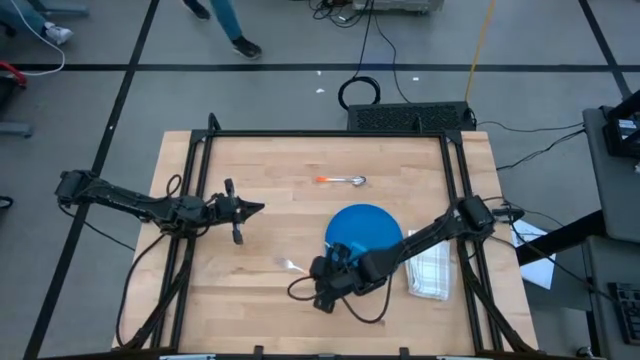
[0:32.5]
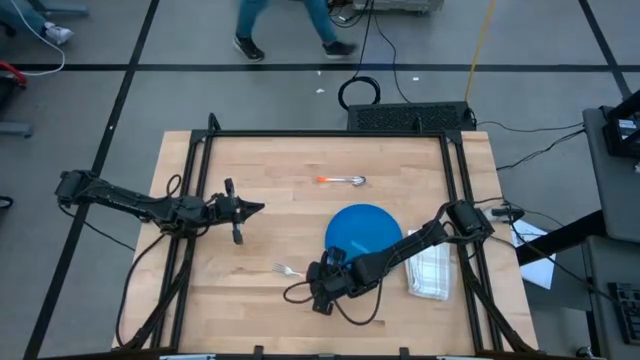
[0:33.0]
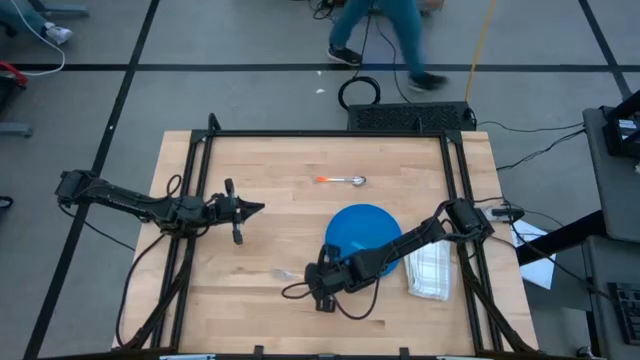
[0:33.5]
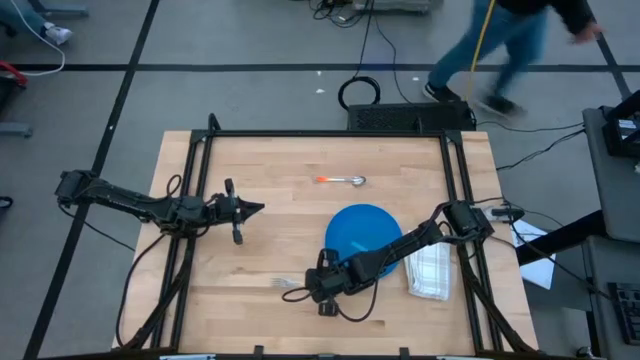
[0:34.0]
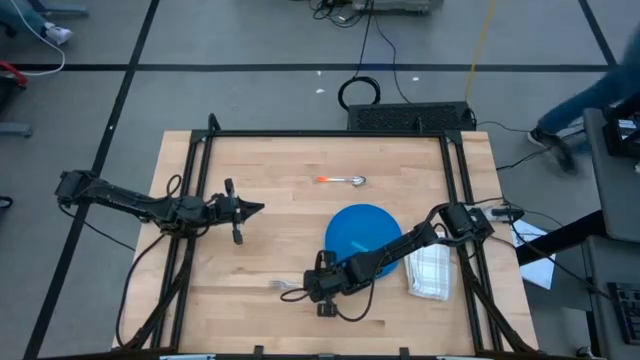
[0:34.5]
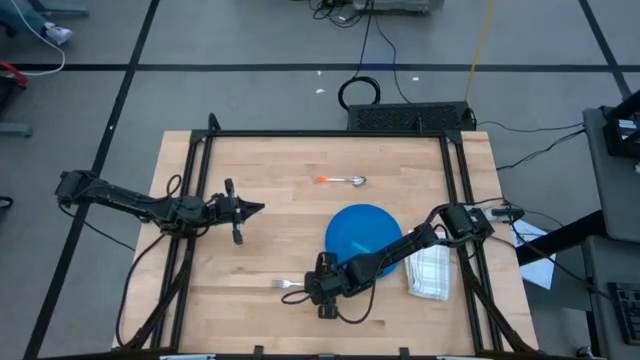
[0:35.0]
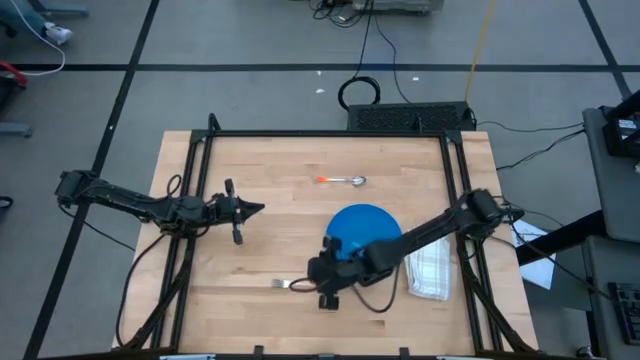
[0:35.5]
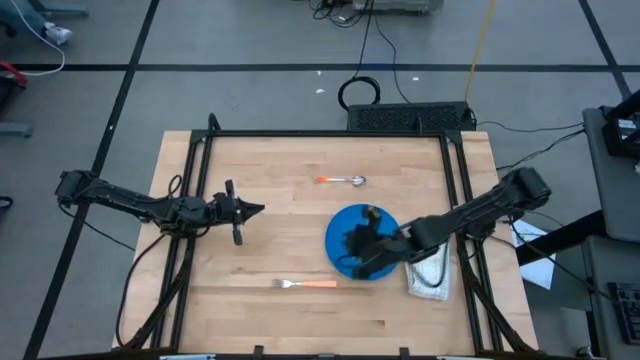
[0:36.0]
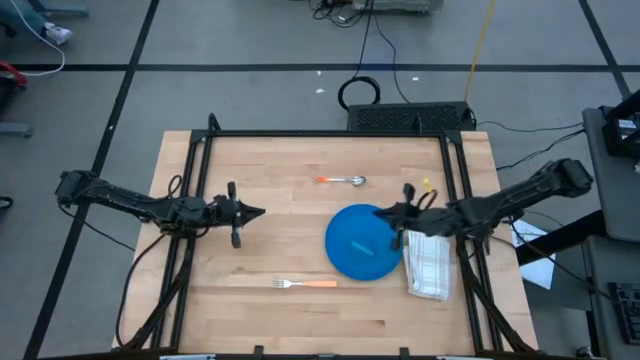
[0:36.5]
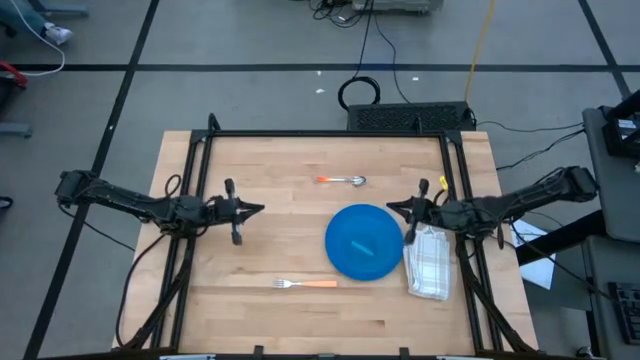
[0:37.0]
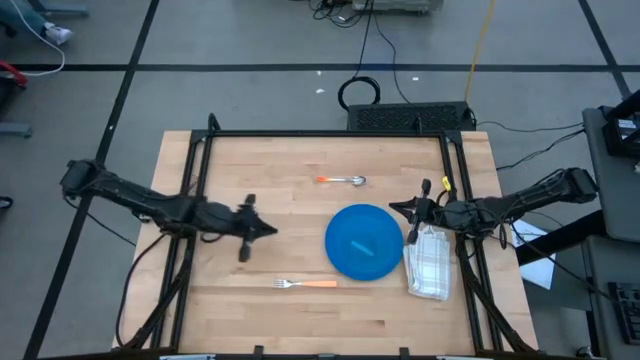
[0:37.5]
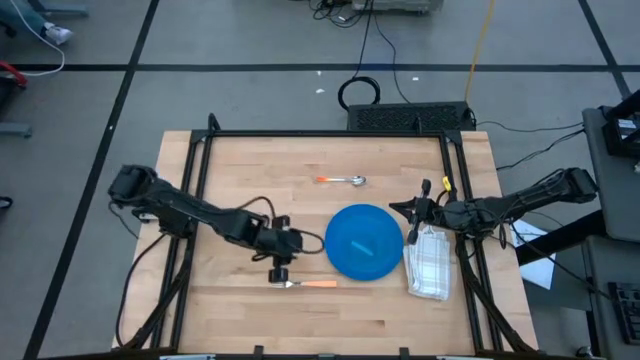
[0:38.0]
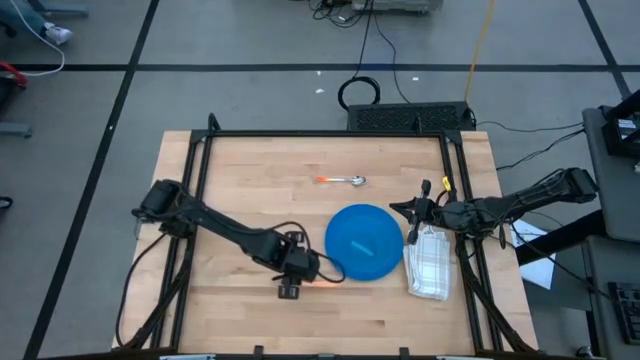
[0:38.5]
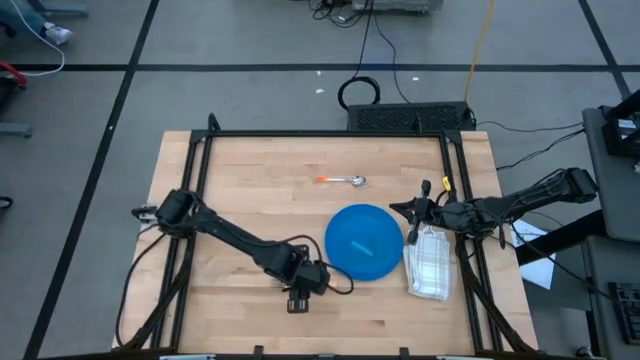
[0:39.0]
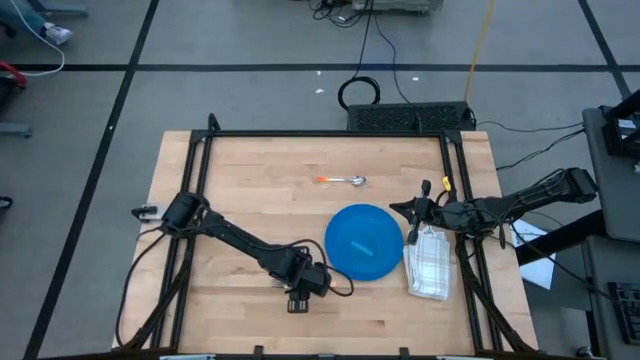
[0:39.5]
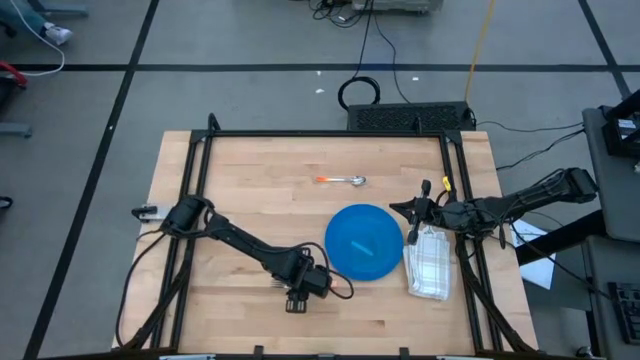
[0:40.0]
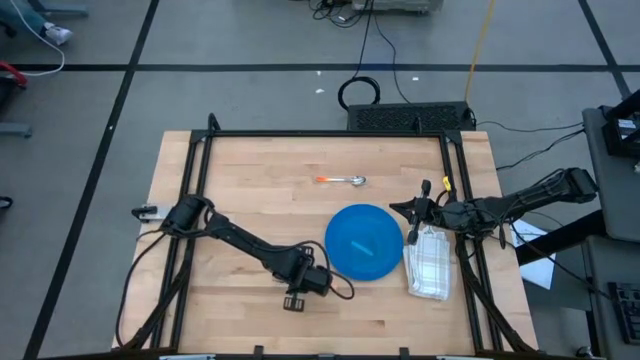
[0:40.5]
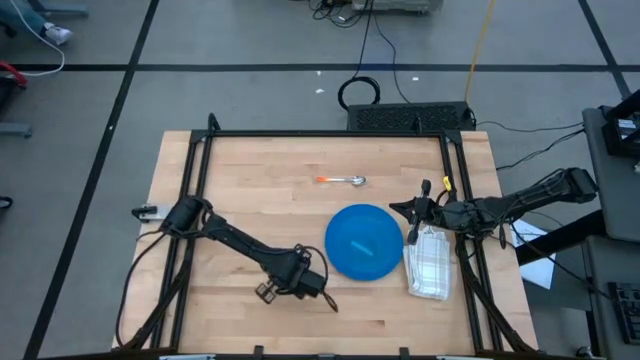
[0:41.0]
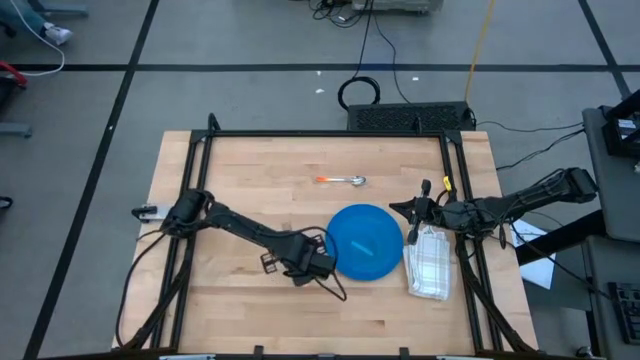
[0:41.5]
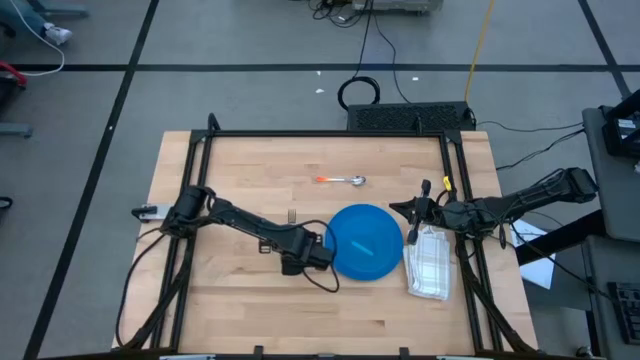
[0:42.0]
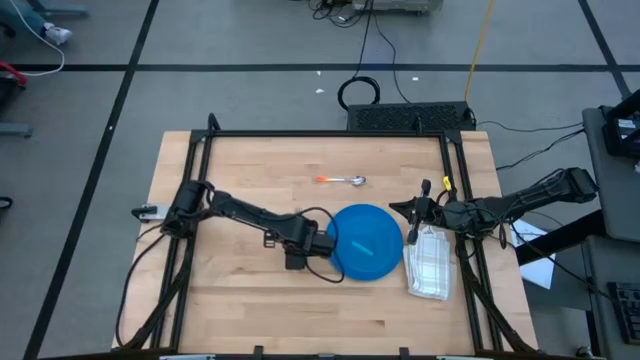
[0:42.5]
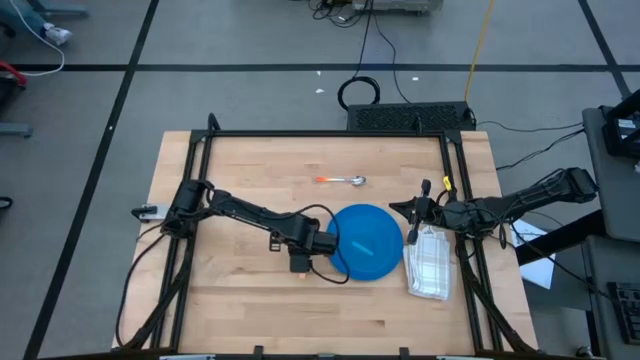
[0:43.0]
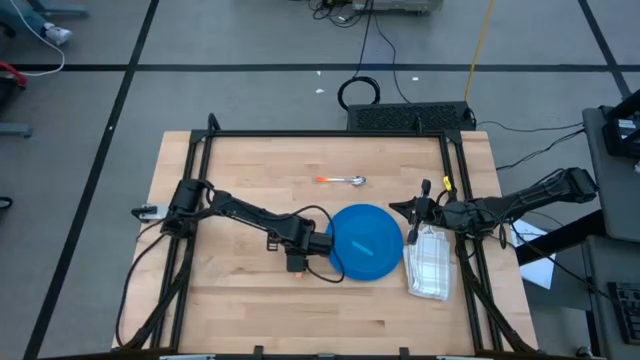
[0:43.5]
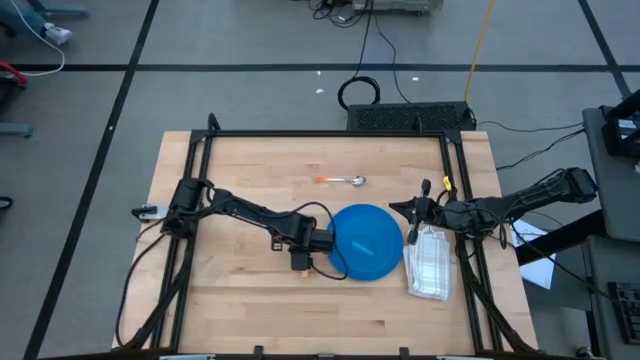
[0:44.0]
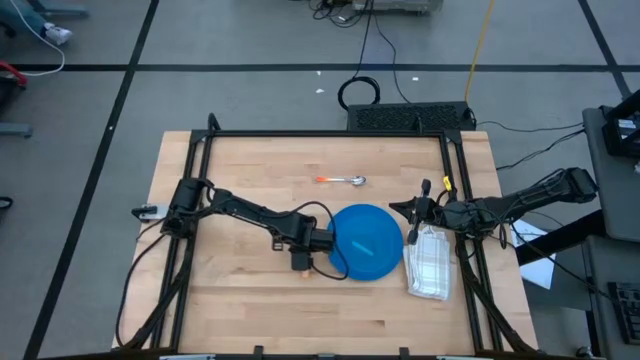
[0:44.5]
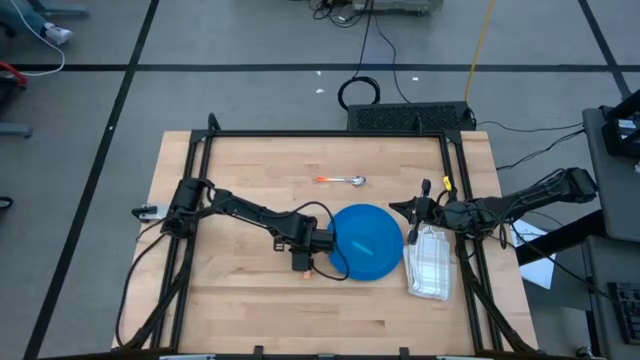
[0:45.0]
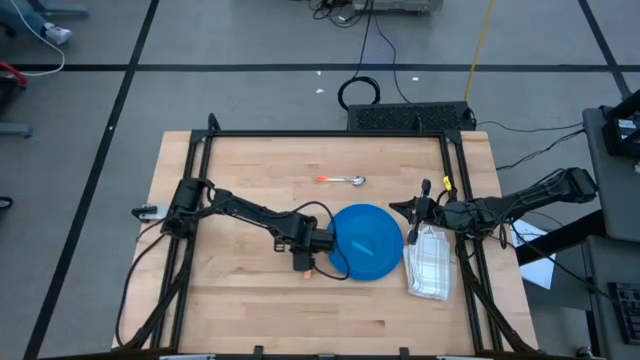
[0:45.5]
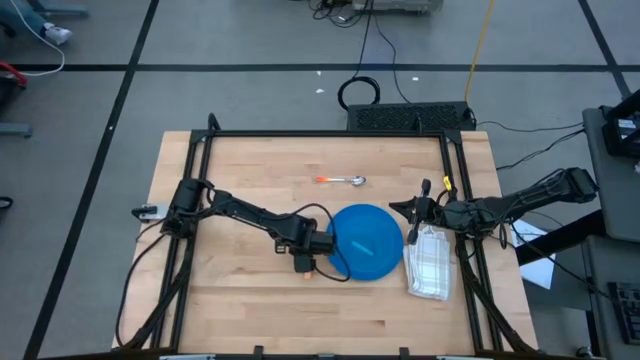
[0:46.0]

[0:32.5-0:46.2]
Task: Set table place
Put the light orange fork to the left of the blue plate

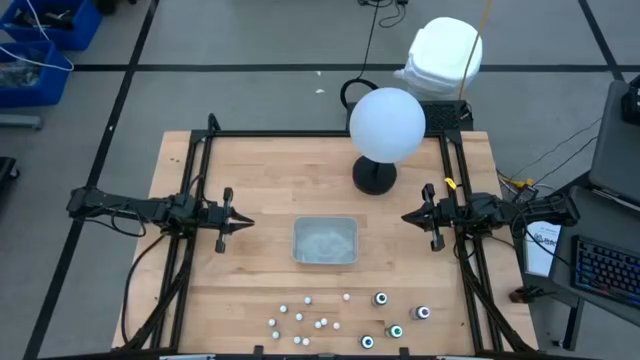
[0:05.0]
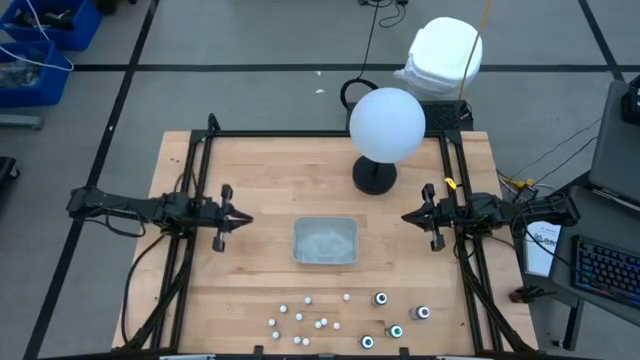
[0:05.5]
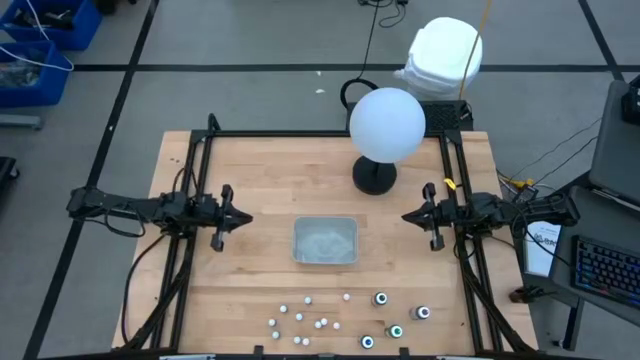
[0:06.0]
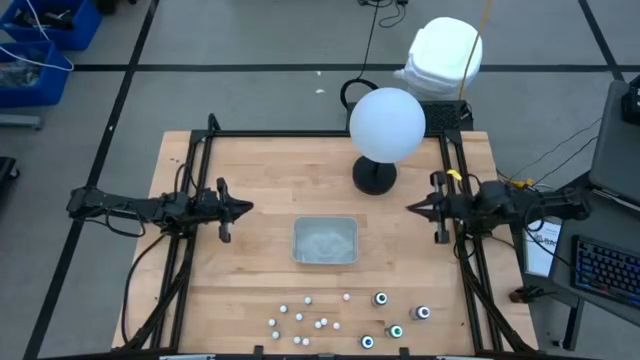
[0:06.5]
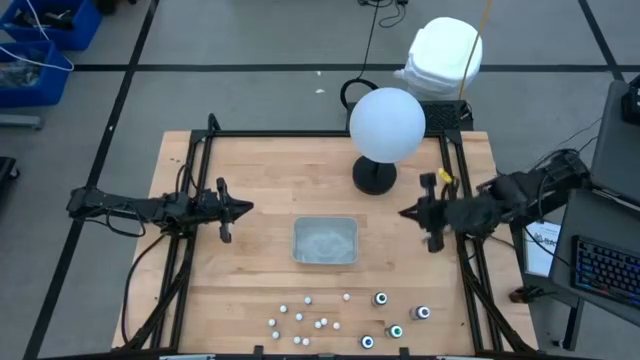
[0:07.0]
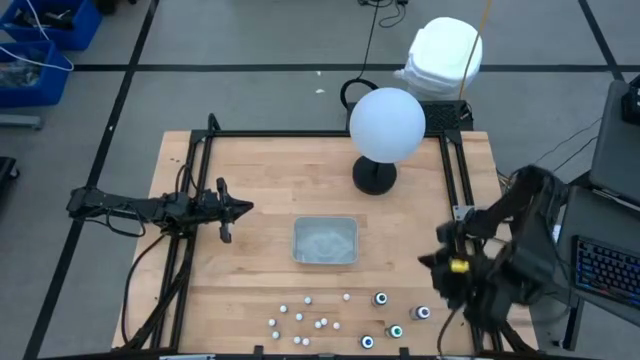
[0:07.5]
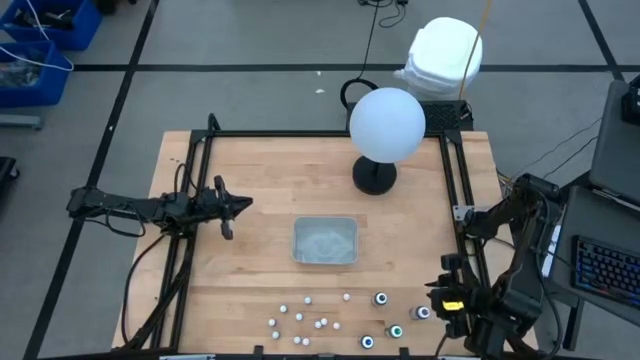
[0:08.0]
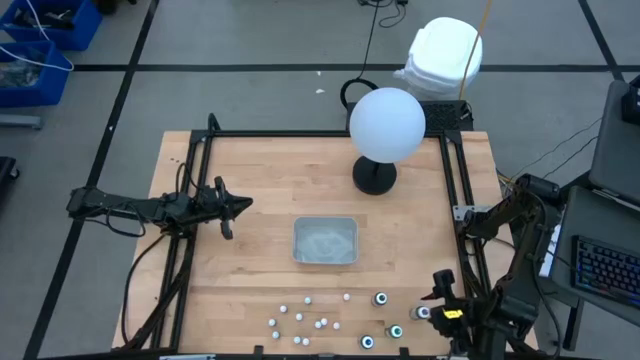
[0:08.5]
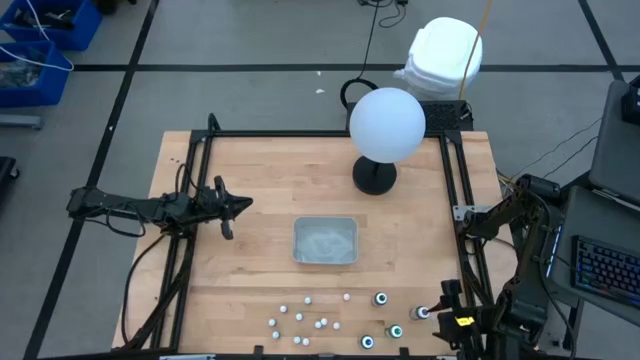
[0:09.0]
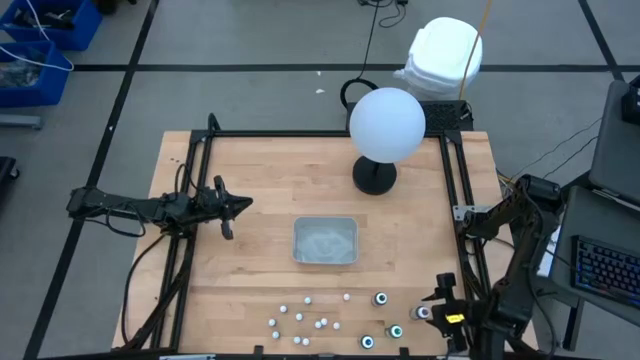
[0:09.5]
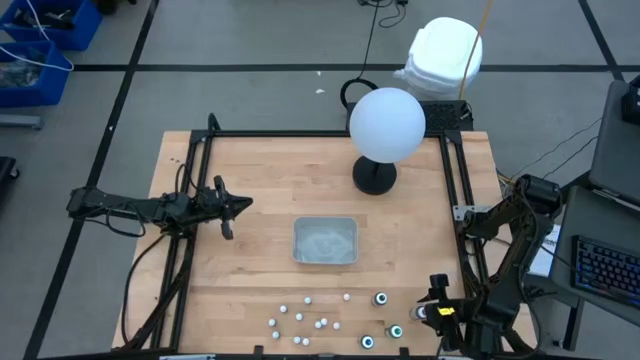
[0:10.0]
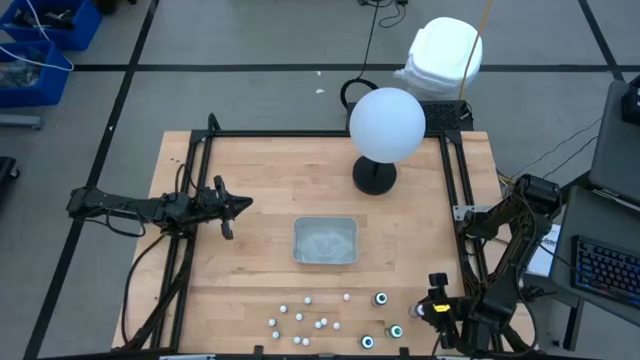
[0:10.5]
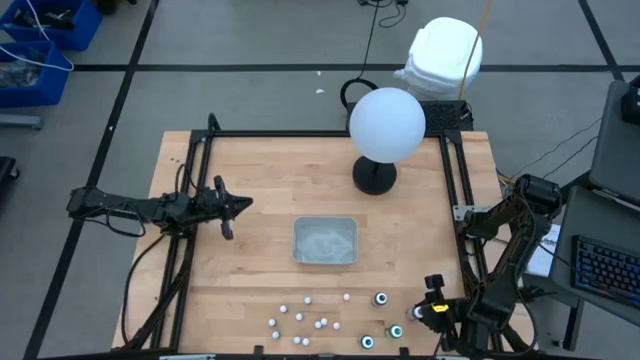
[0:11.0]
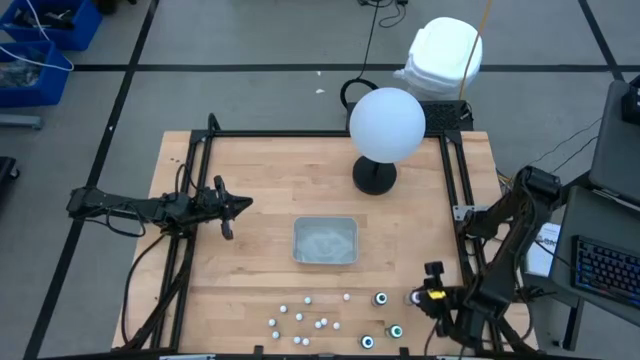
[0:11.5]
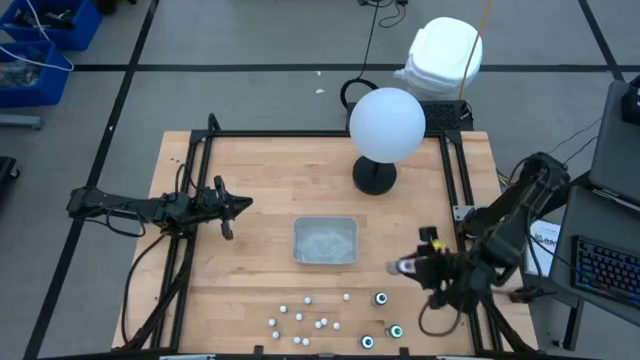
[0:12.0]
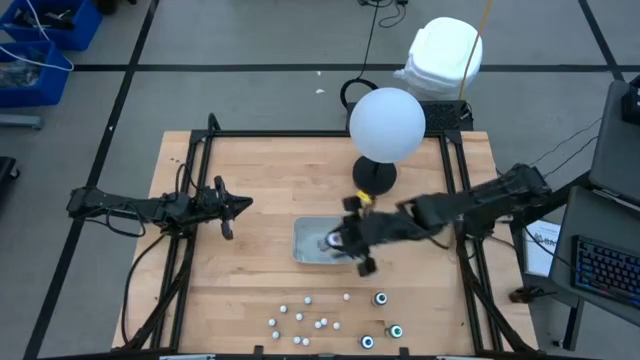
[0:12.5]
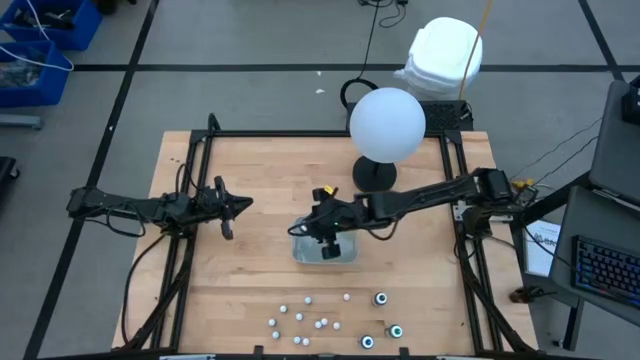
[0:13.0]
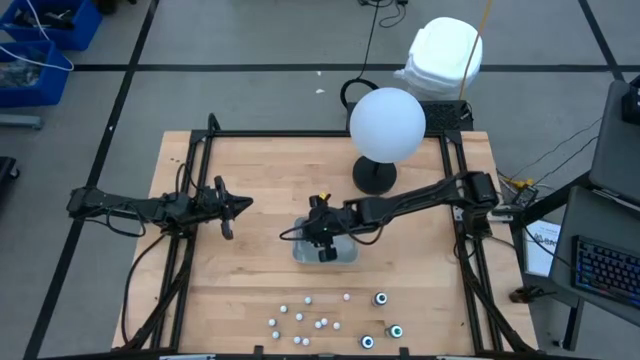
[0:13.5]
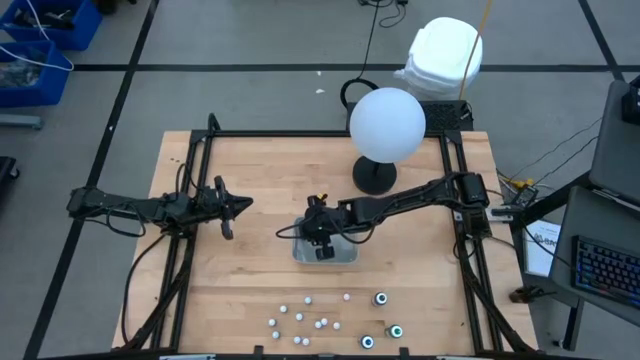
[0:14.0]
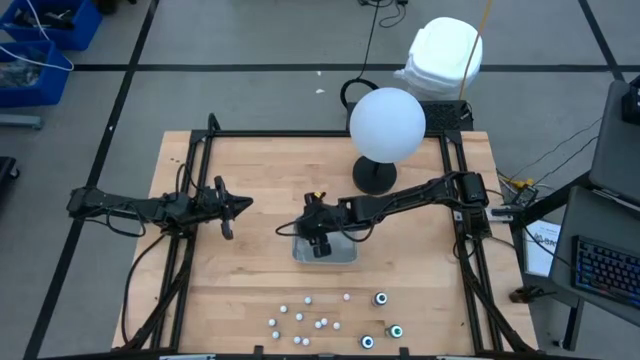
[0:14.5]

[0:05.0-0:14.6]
Task: Pick & Place food coloring
Put the large violet food coloring bottle into the gray bin
